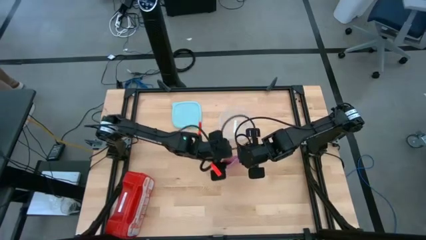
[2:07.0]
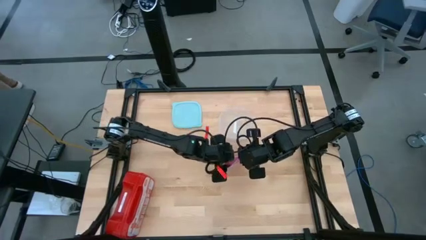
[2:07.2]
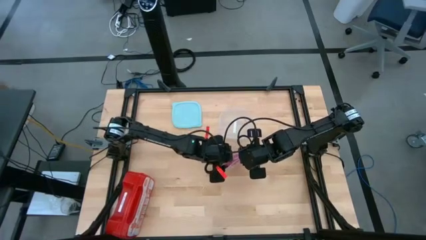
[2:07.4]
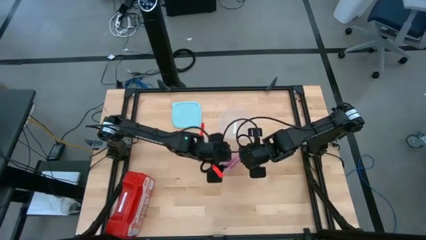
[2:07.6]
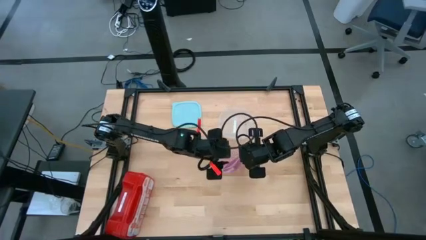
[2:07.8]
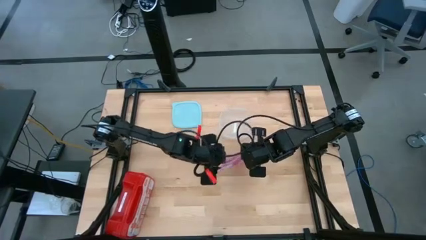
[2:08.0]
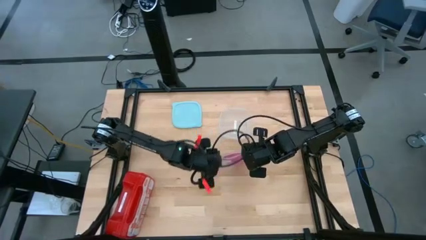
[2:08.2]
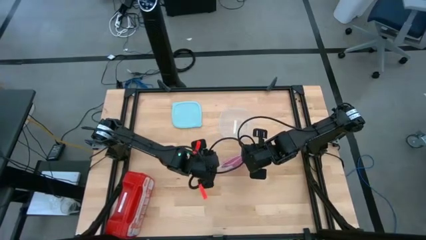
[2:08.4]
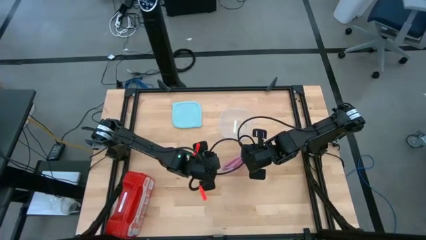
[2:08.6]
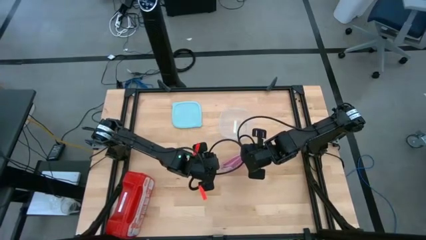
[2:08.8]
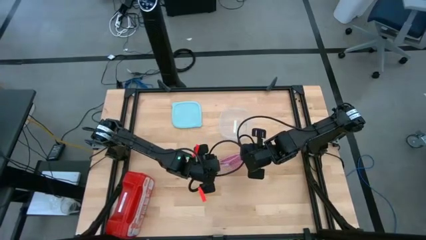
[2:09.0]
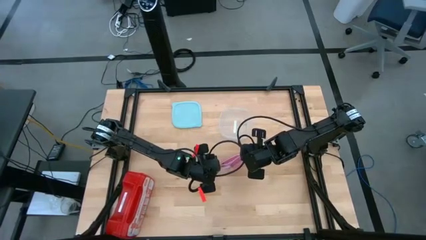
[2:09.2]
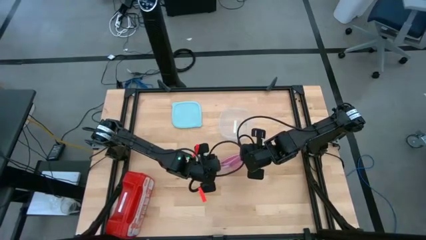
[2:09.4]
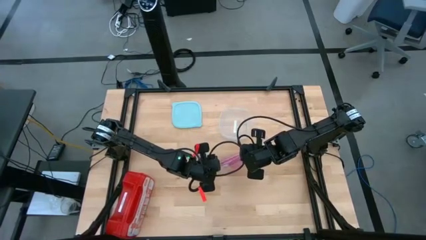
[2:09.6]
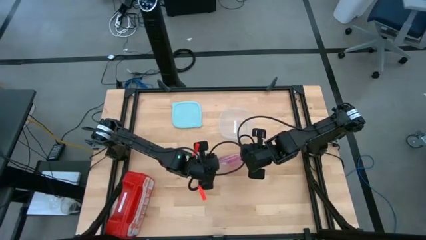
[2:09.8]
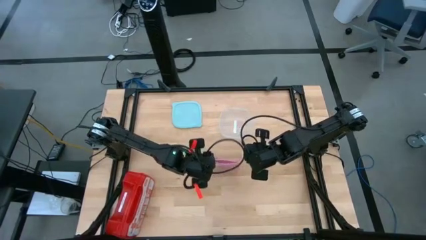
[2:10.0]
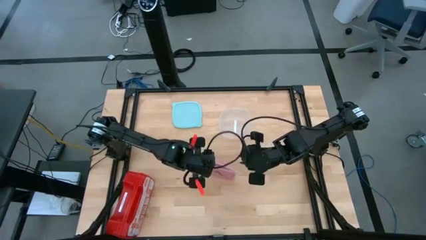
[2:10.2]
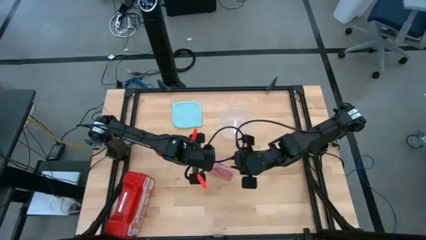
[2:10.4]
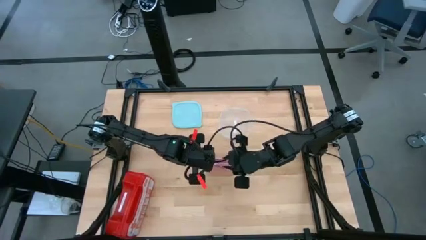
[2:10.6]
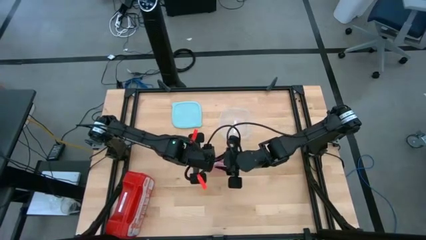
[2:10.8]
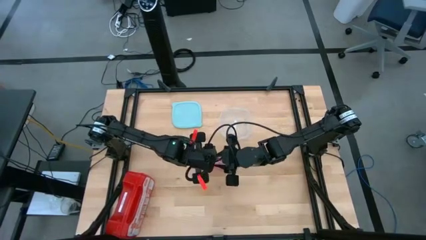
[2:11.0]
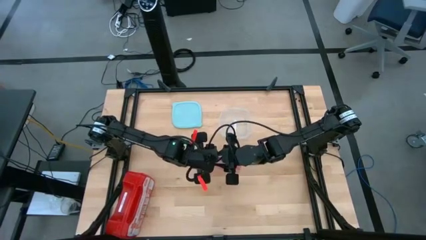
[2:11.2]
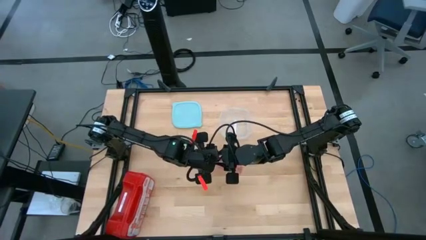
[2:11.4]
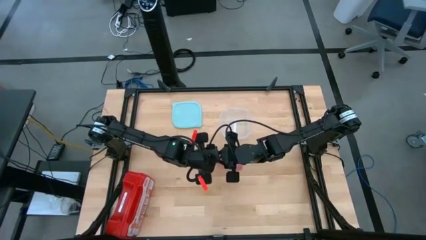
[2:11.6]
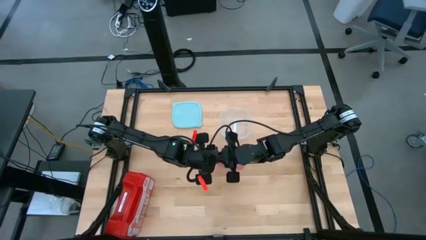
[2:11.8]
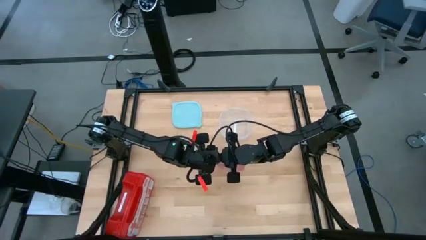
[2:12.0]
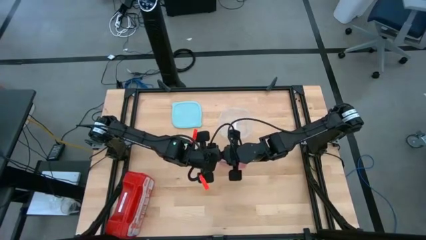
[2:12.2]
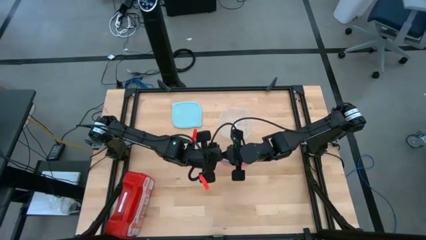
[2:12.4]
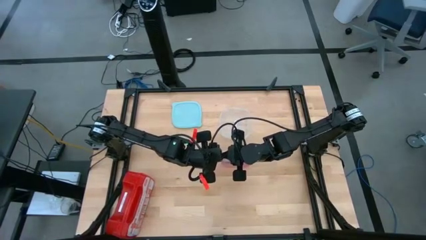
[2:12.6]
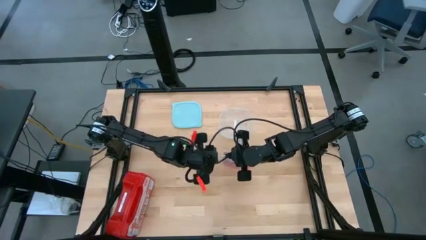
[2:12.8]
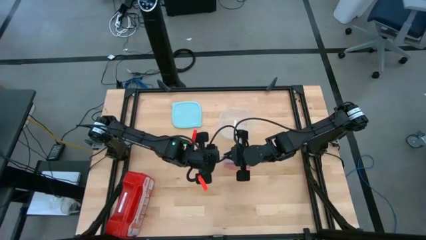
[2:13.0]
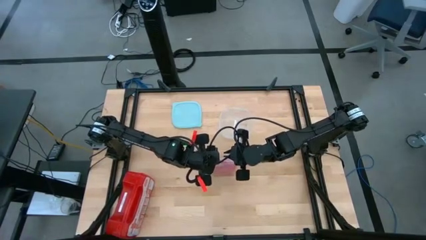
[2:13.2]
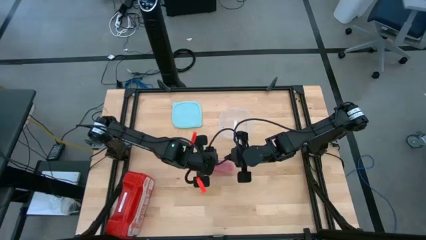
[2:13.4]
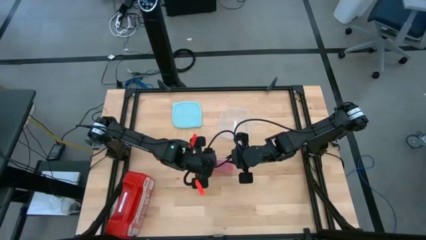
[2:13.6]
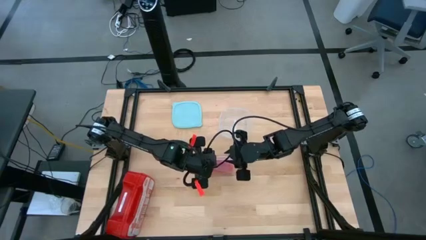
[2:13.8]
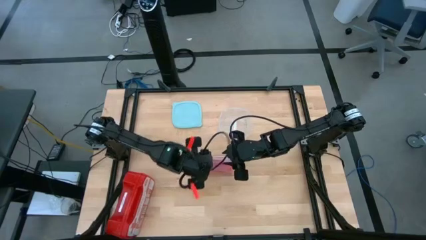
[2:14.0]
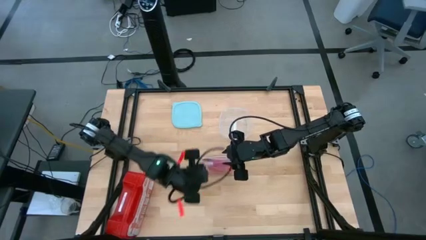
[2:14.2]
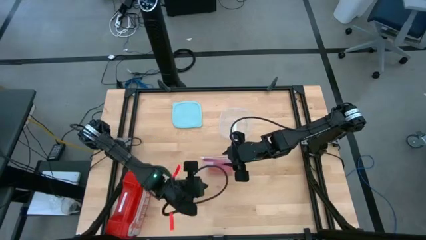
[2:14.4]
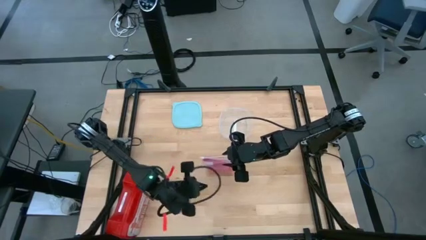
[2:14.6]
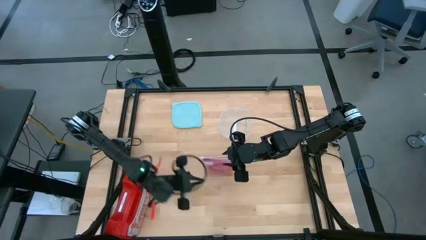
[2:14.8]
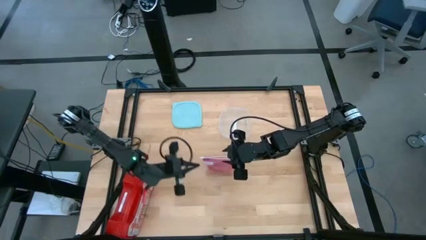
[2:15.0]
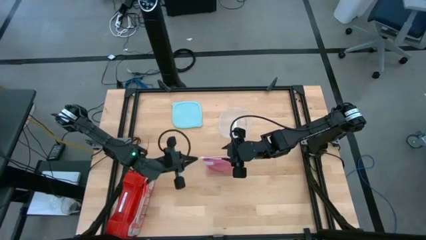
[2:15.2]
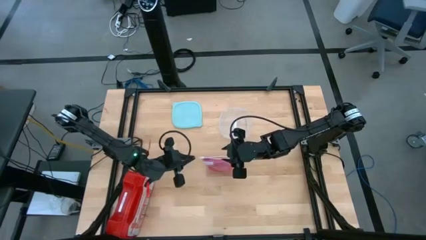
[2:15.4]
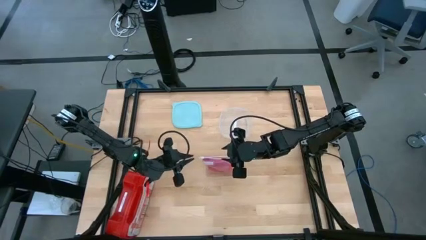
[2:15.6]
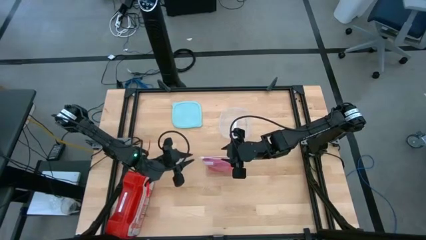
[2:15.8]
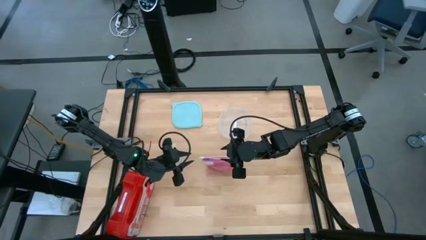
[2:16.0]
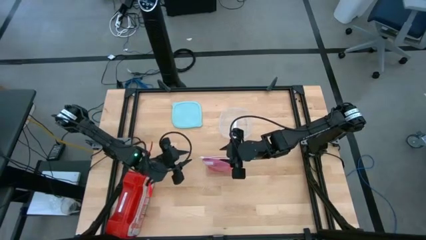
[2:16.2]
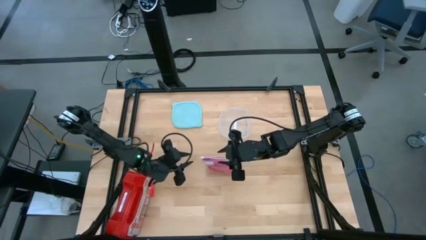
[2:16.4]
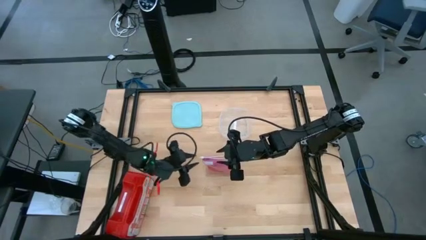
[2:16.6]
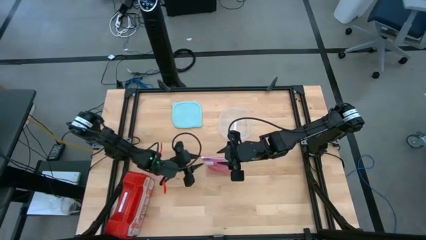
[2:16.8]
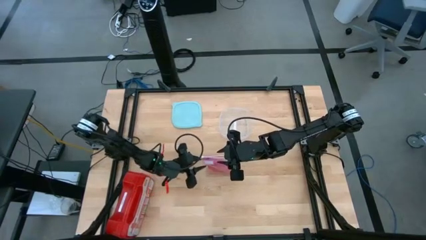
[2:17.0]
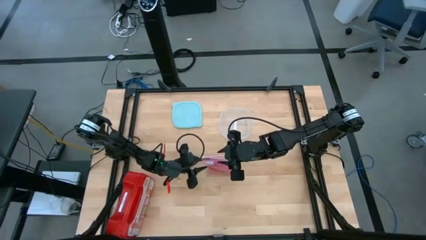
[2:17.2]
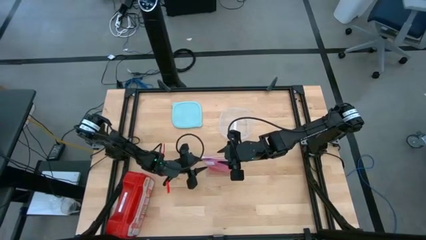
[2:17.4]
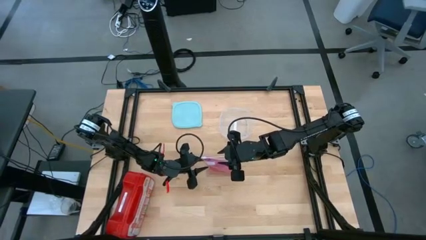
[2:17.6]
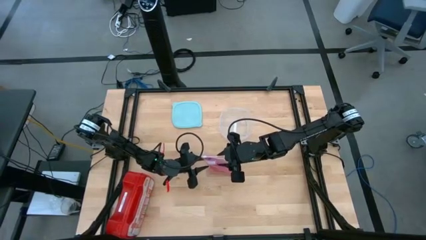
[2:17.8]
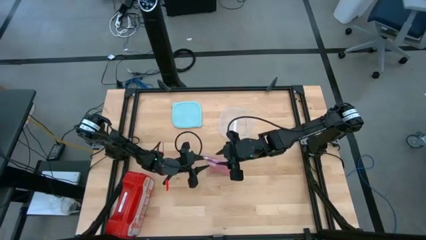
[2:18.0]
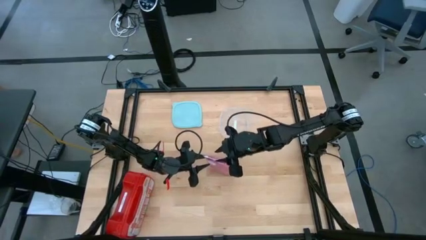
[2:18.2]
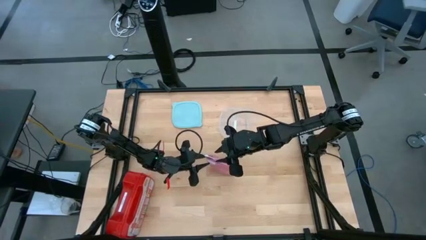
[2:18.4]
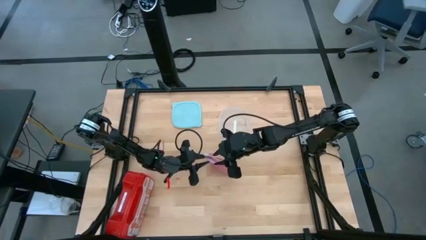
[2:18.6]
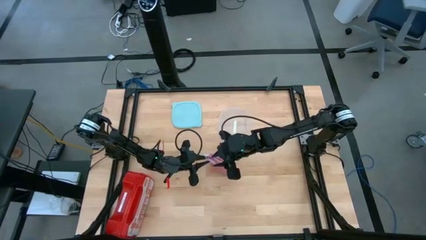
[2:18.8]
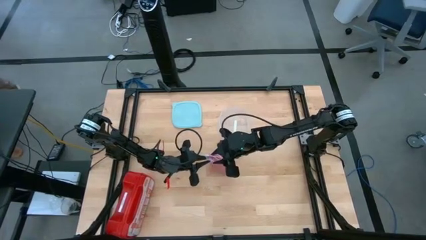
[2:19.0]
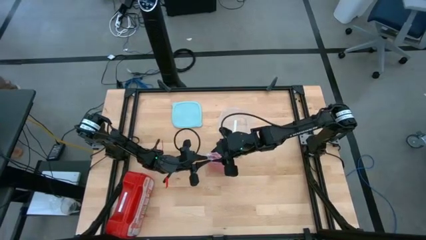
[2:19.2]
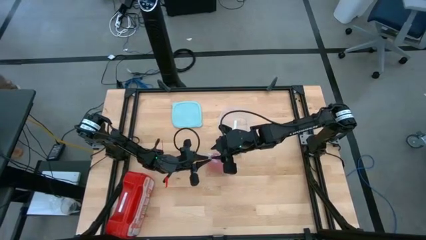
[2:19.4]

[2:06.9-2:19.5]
Task: Roll bandage
Close the transparent zip bag
